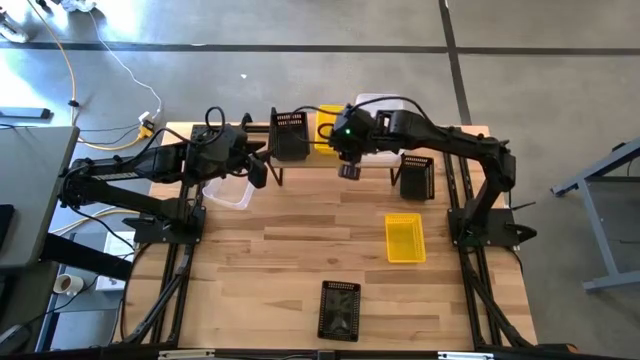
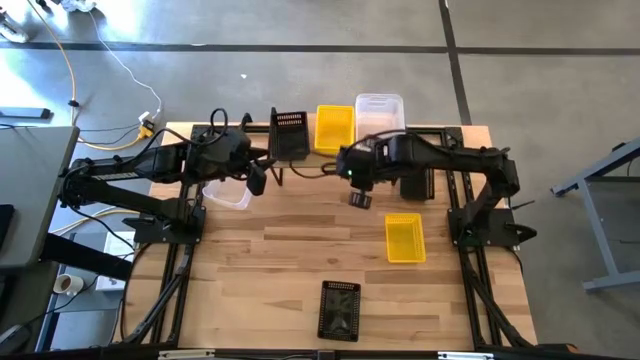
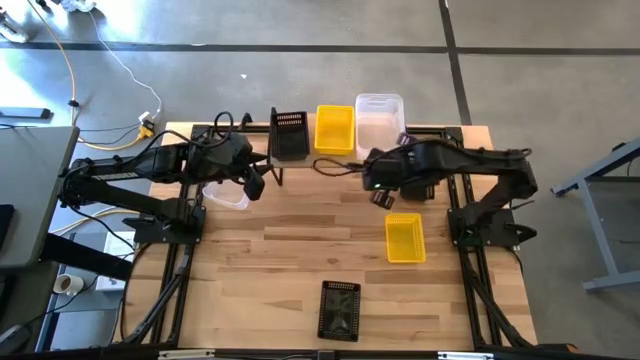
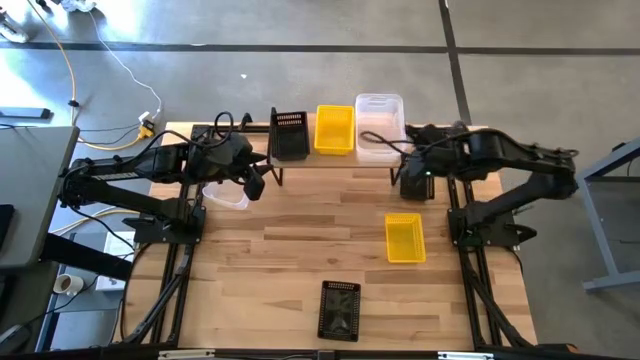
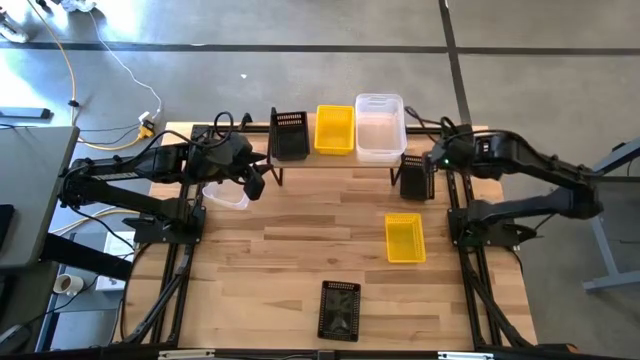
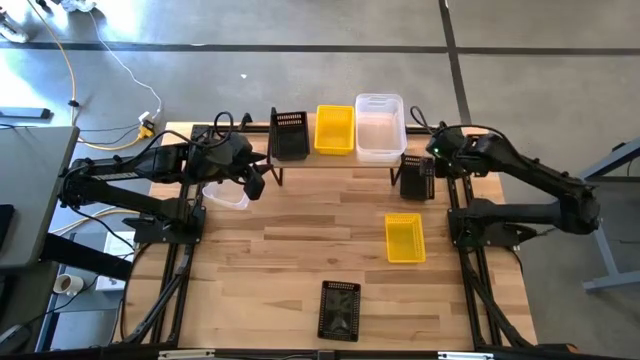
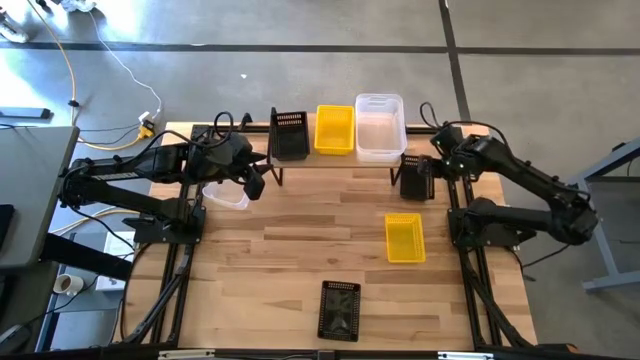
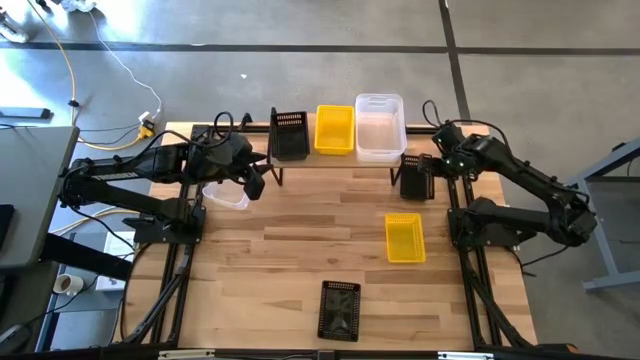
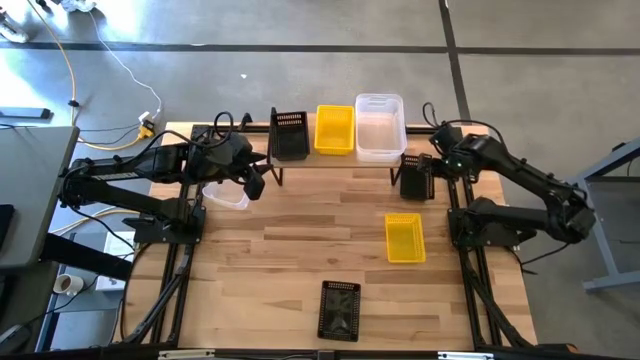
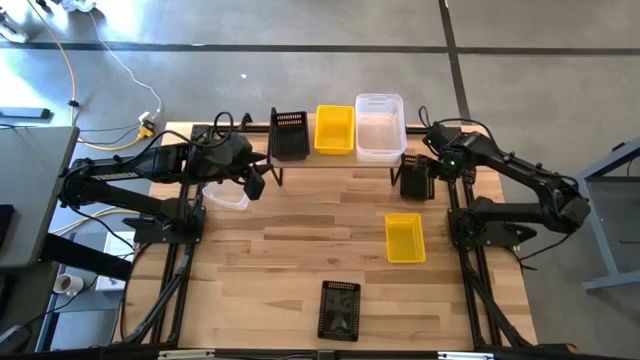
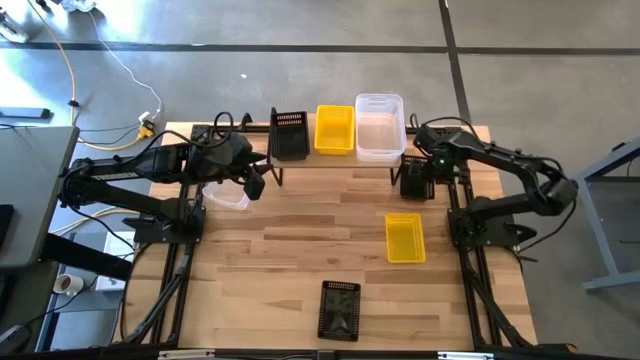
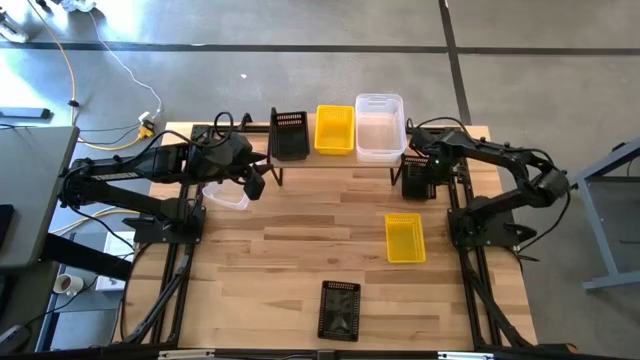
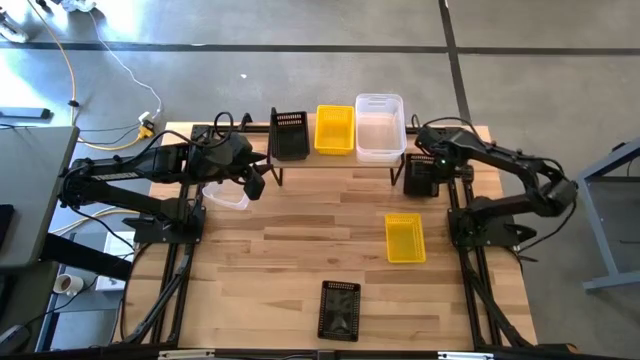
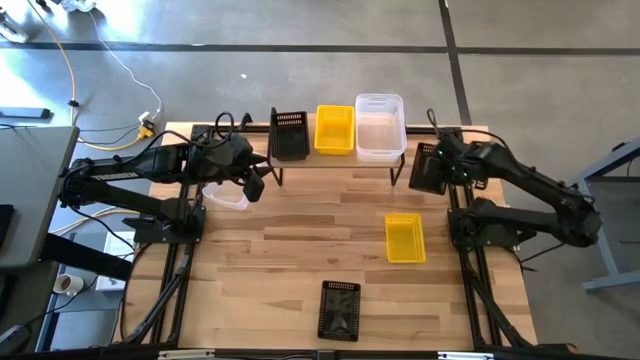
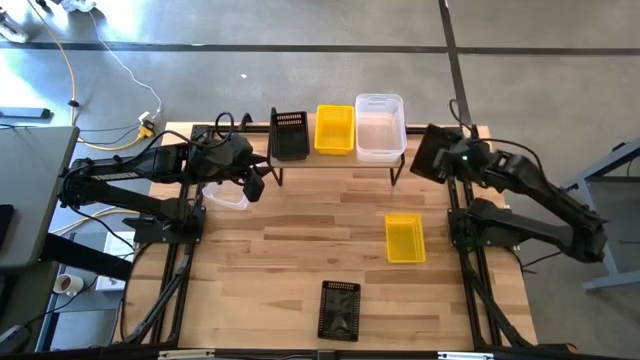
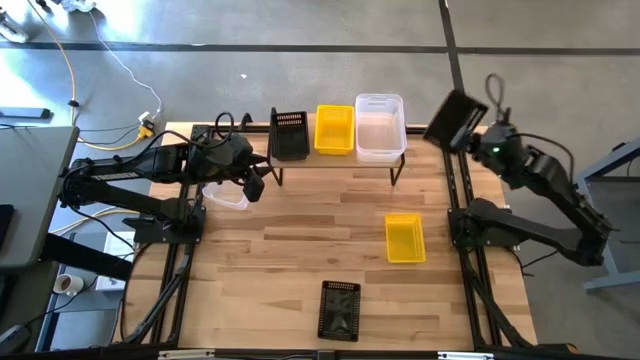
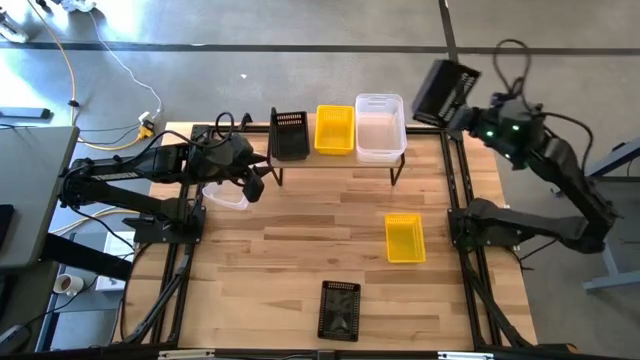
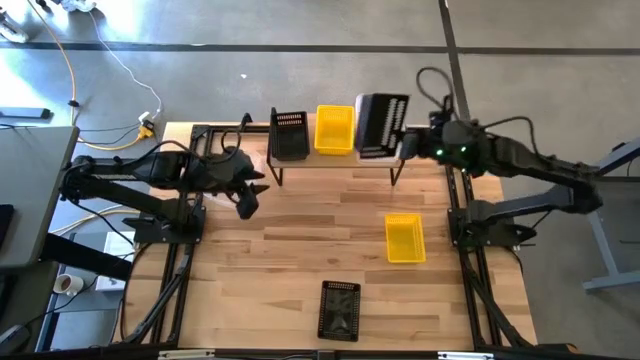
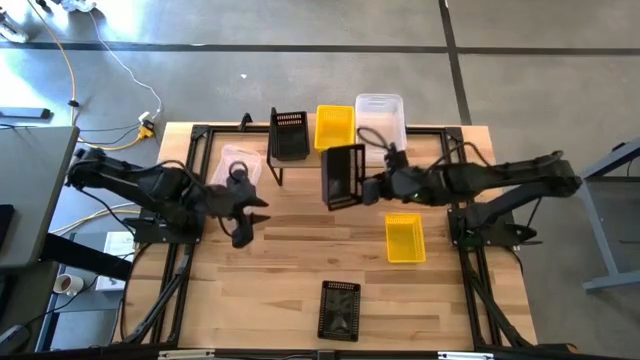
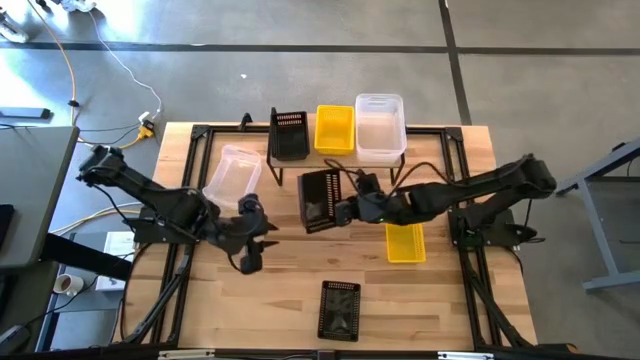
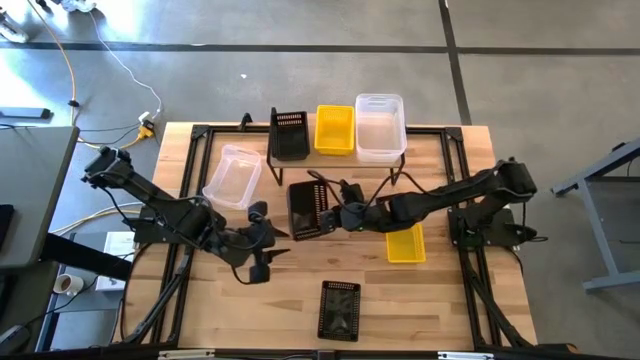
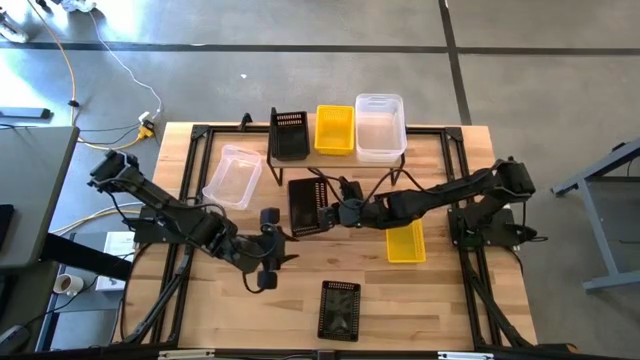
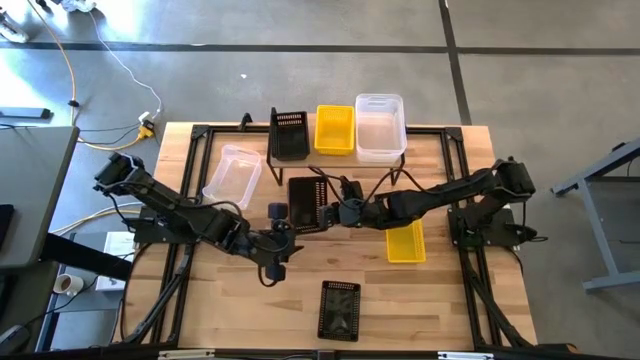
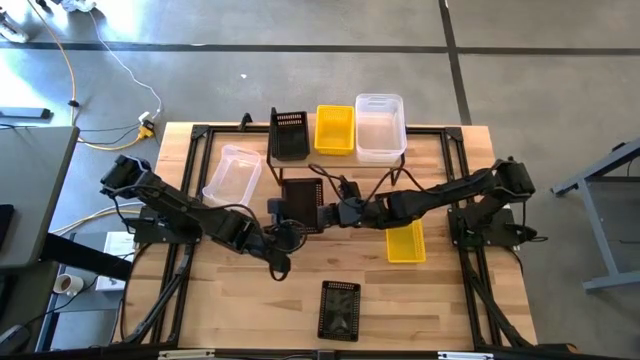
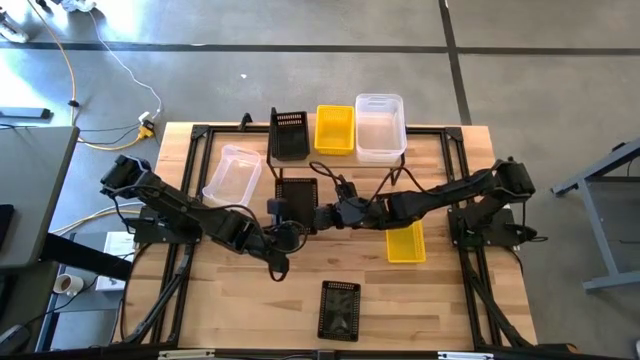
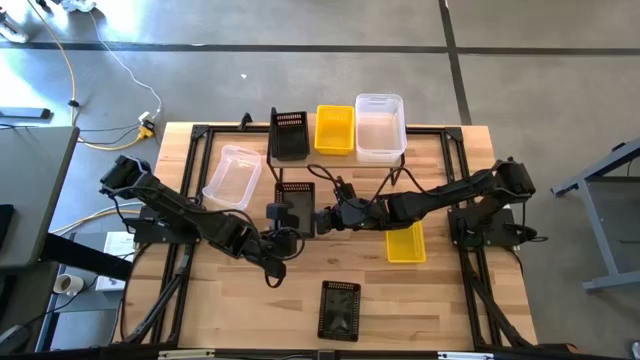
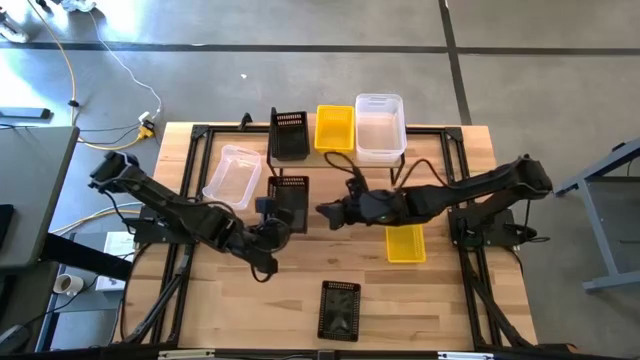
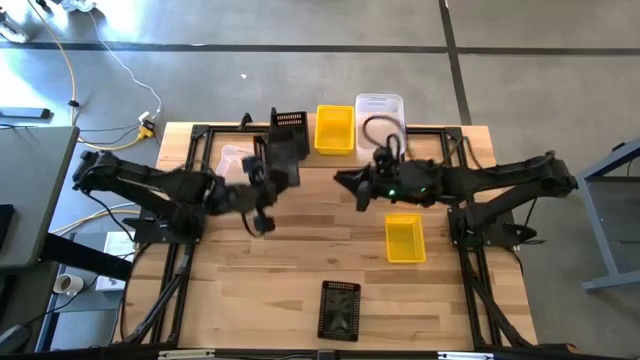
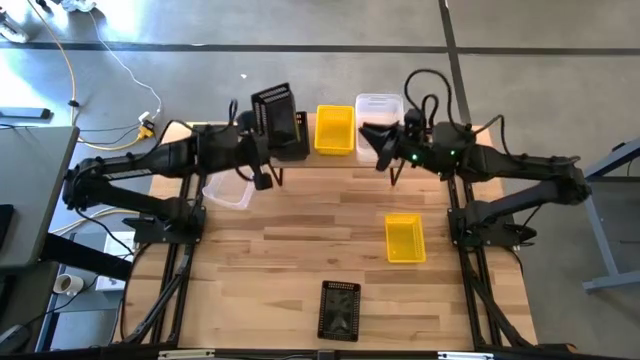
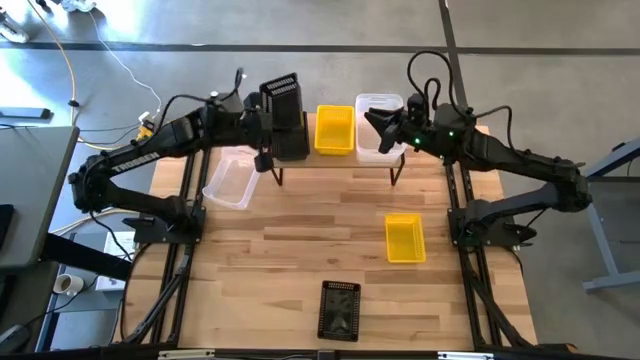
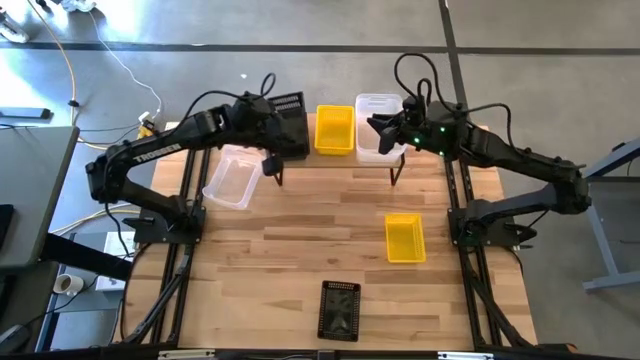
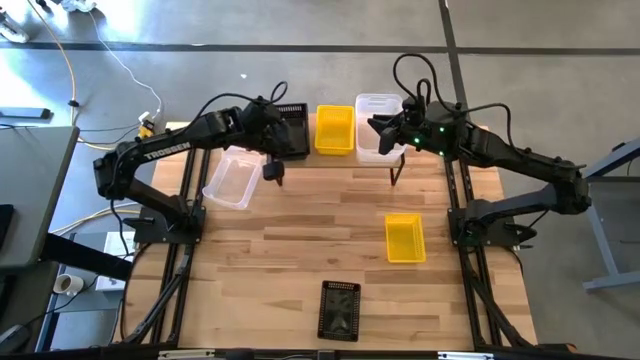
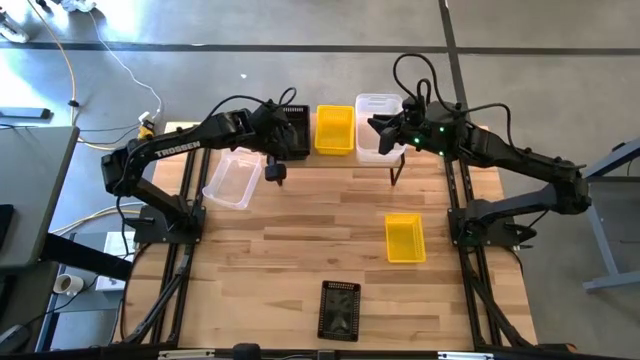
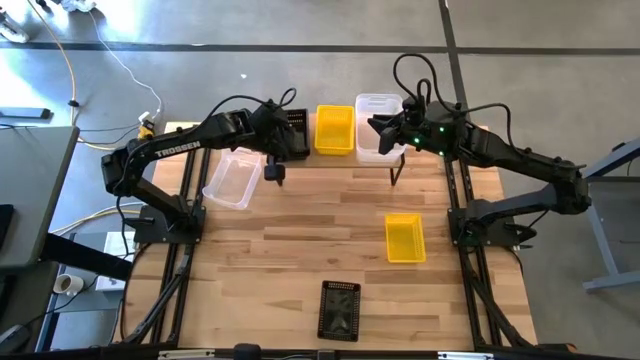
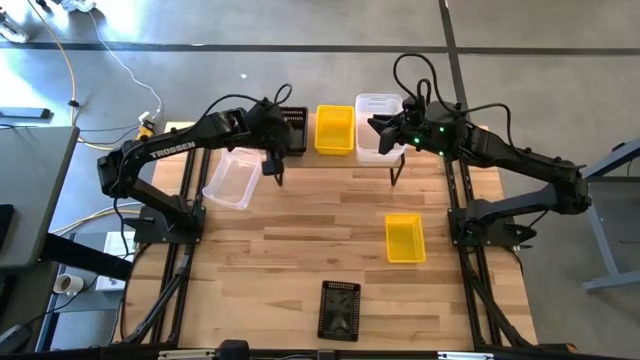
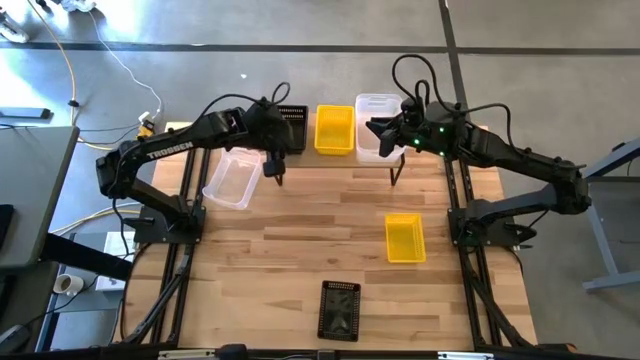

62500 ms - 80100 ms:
Task: Stack baskets on shelf by color
Stack the top black basket on top of the black basket on the shelf

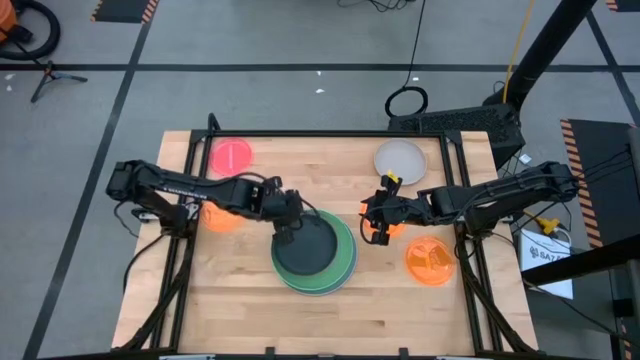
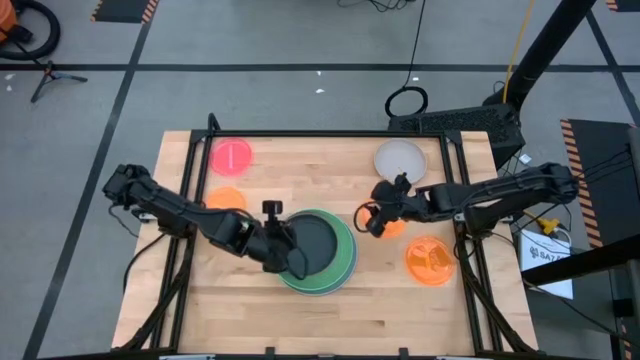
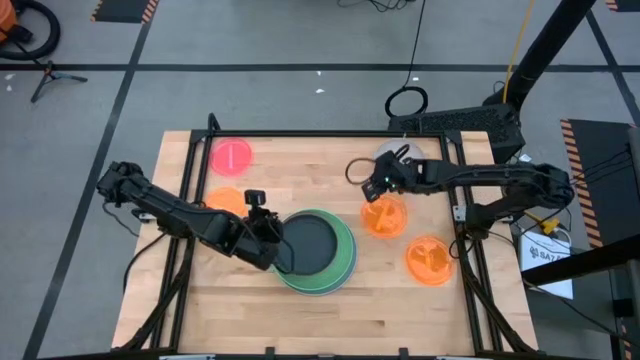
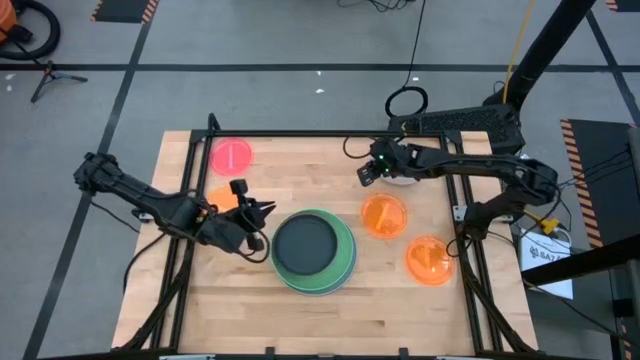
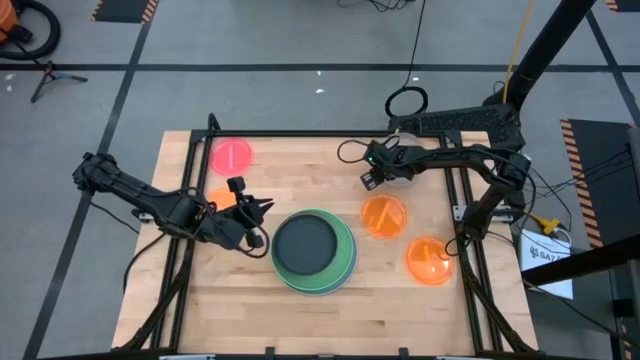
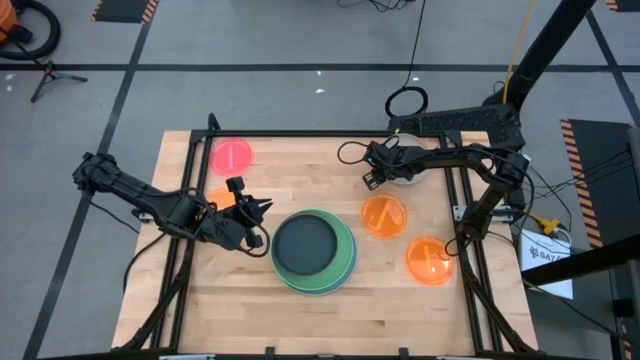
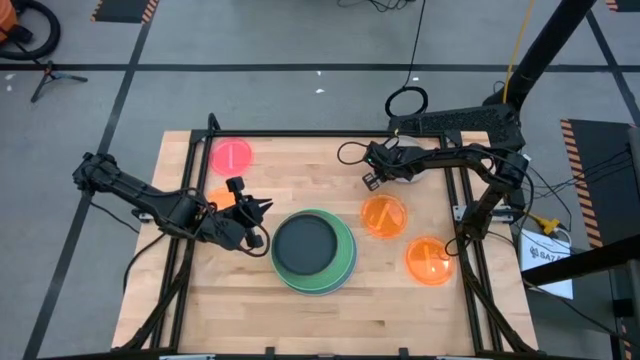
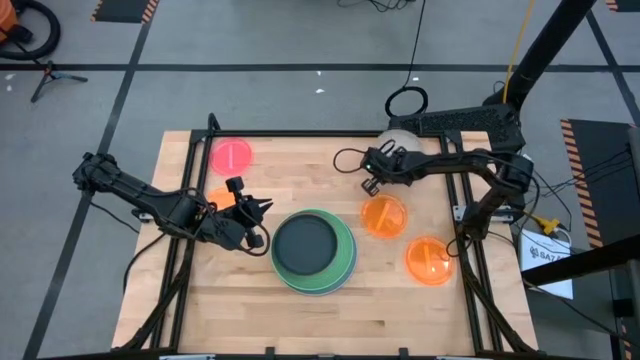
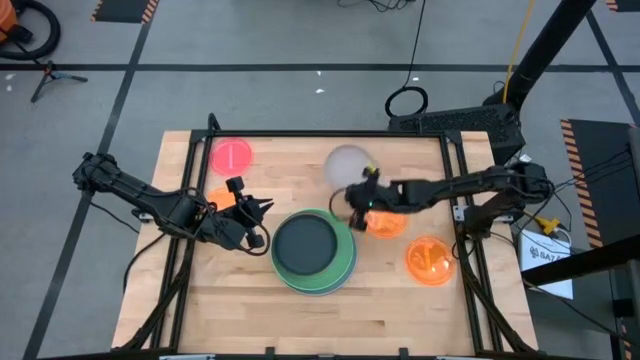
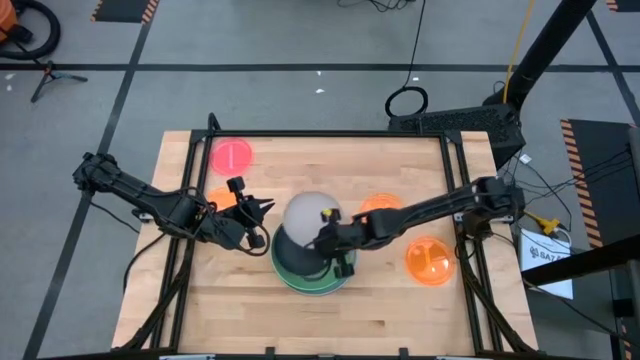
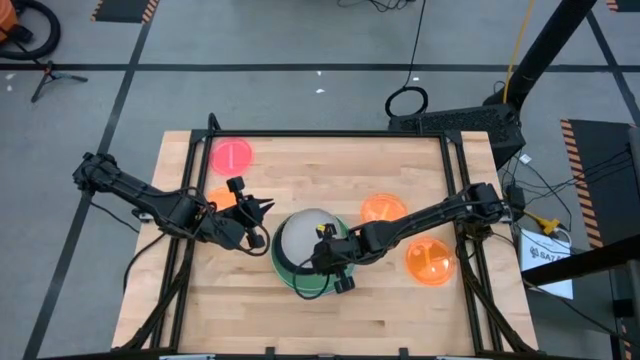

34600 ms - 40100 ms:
Task: Stack plastic plates
Stack the gray plate on the black plate
